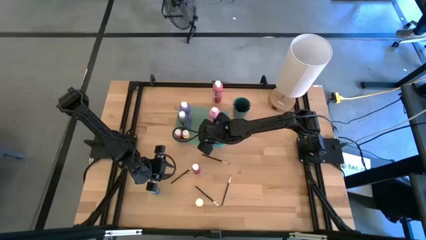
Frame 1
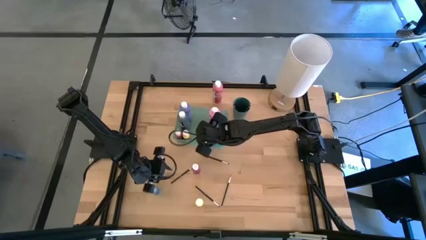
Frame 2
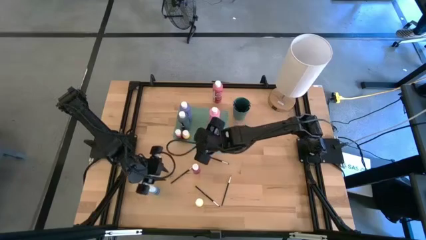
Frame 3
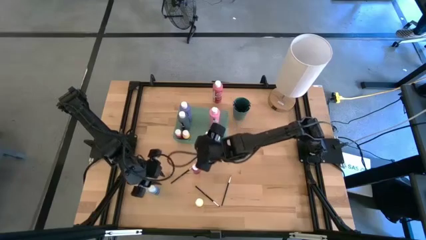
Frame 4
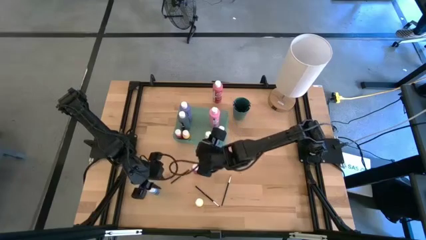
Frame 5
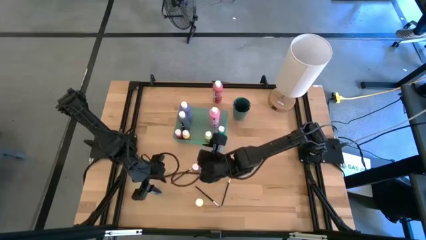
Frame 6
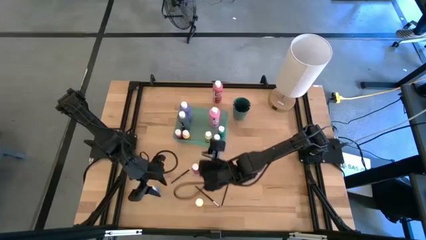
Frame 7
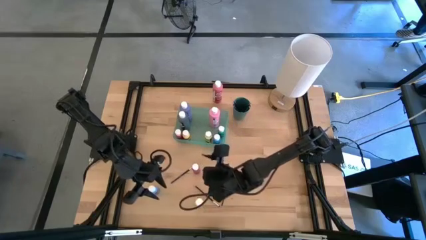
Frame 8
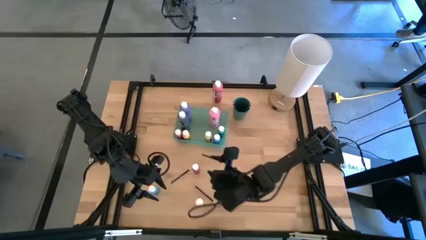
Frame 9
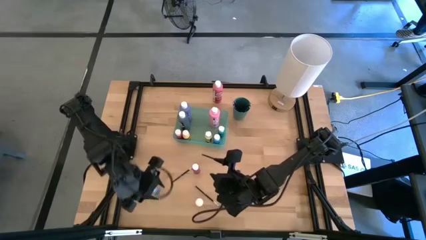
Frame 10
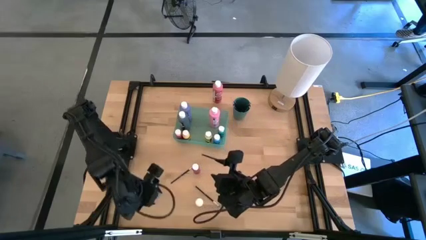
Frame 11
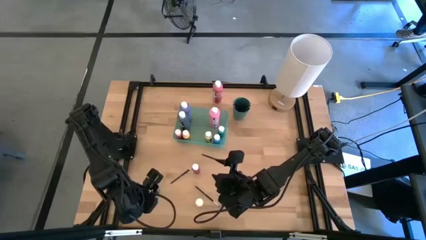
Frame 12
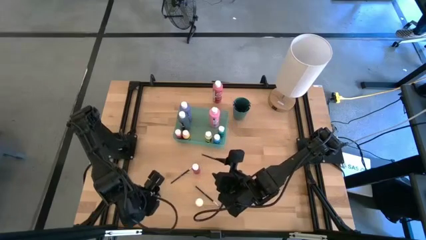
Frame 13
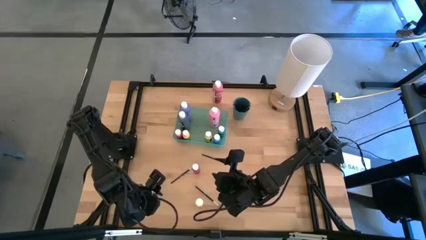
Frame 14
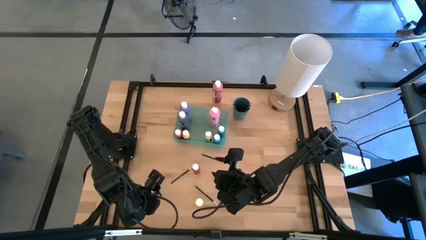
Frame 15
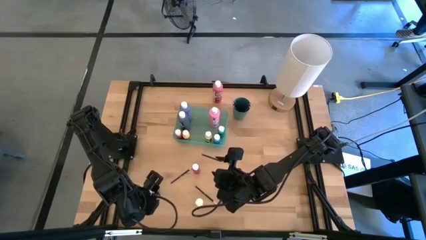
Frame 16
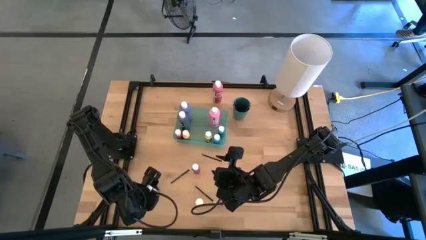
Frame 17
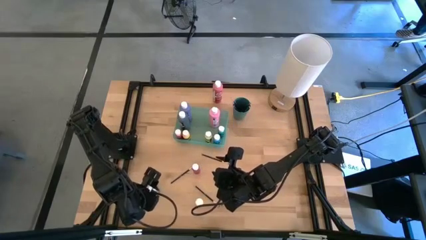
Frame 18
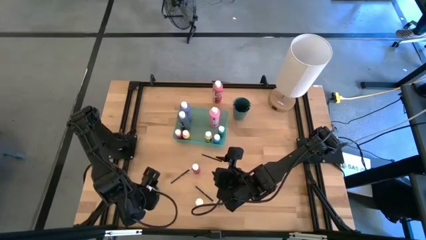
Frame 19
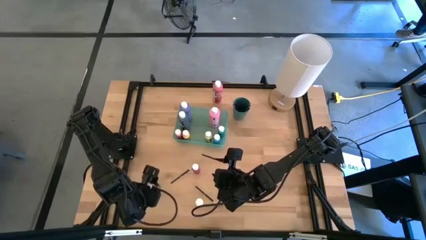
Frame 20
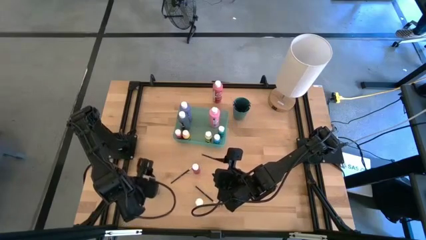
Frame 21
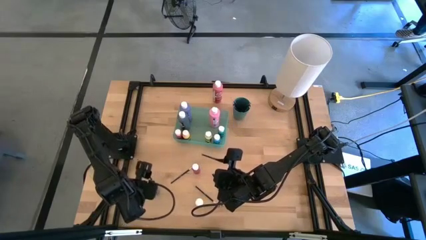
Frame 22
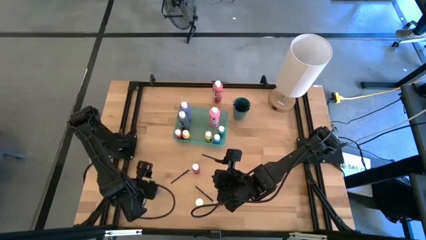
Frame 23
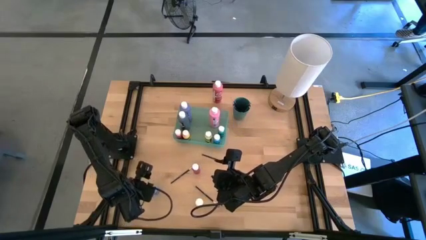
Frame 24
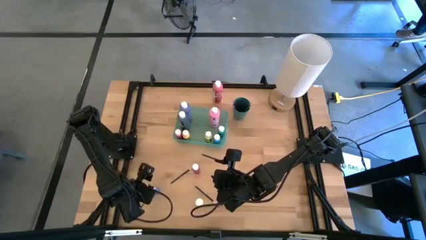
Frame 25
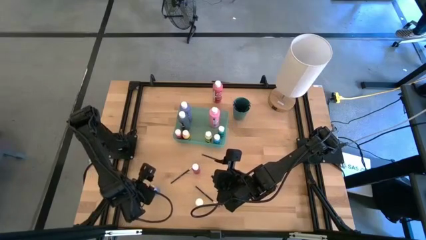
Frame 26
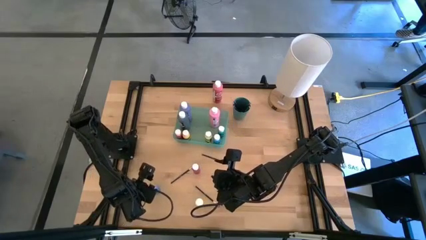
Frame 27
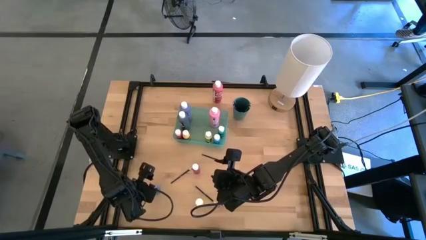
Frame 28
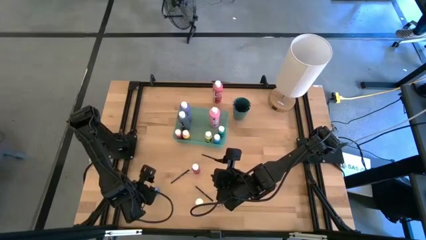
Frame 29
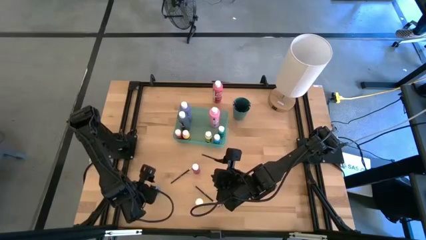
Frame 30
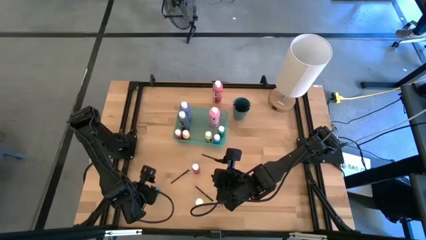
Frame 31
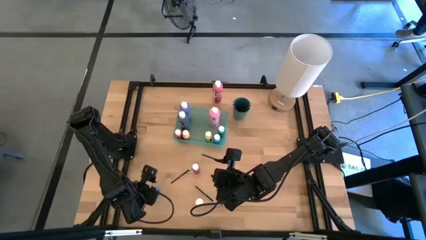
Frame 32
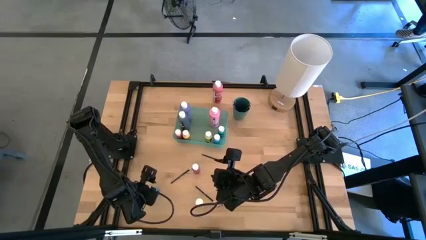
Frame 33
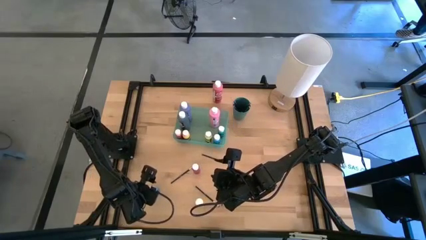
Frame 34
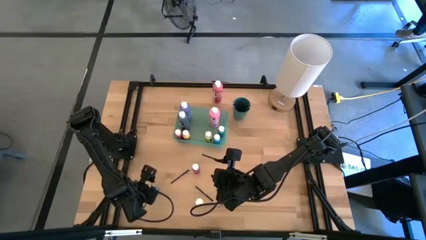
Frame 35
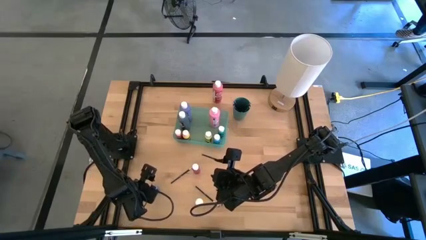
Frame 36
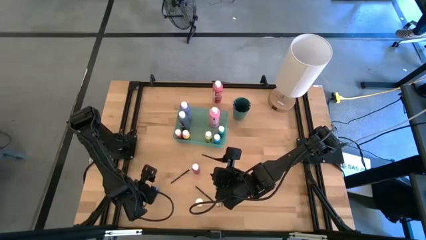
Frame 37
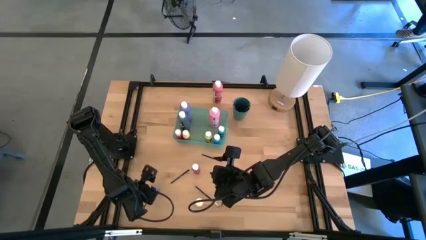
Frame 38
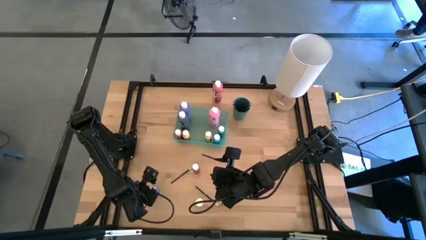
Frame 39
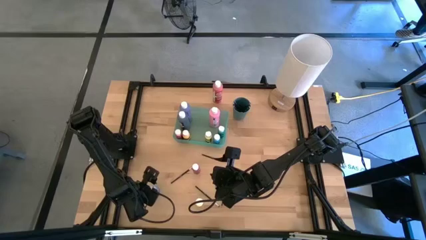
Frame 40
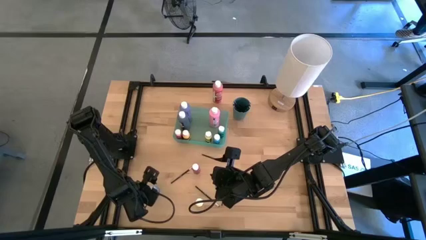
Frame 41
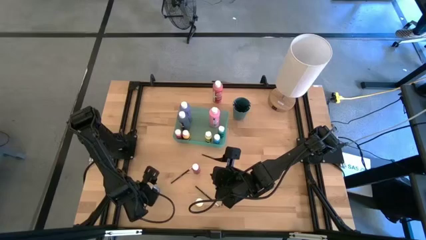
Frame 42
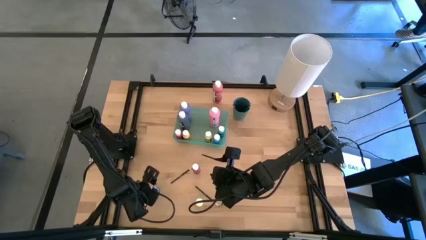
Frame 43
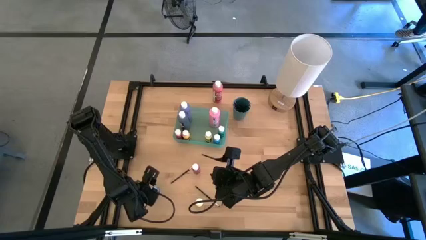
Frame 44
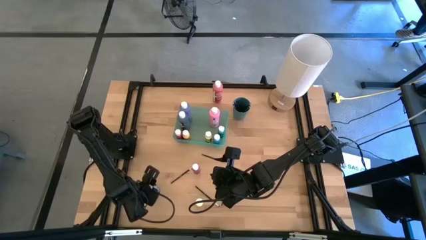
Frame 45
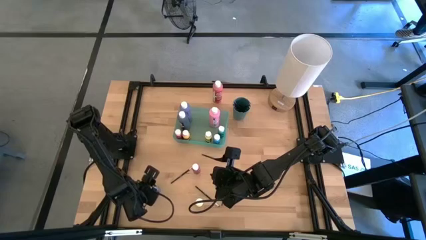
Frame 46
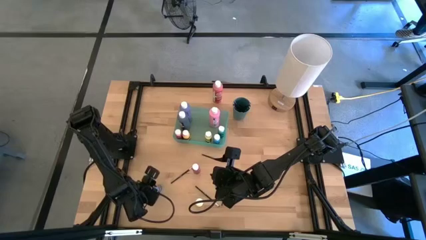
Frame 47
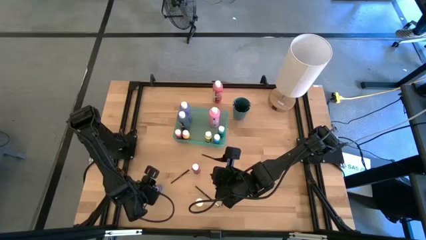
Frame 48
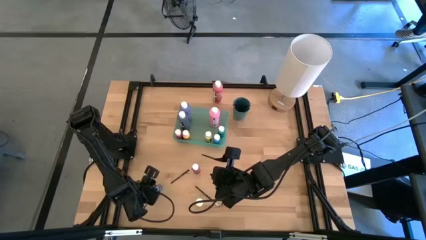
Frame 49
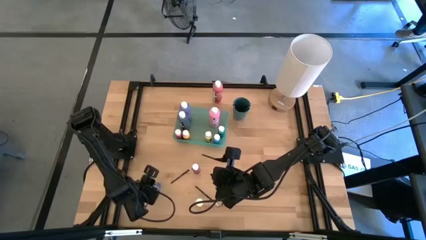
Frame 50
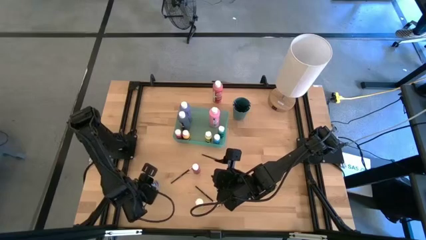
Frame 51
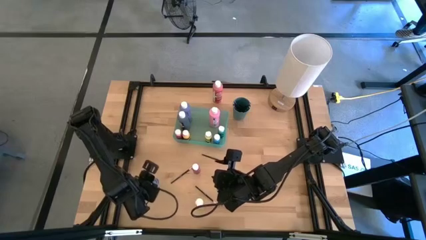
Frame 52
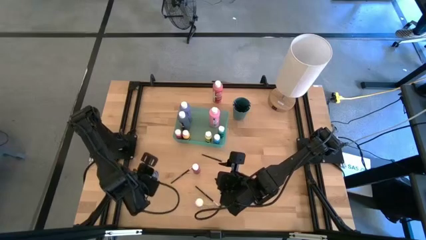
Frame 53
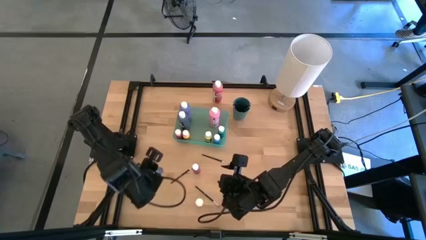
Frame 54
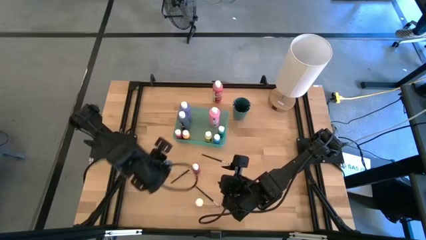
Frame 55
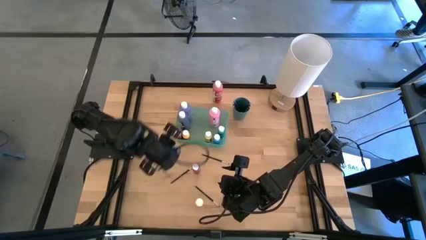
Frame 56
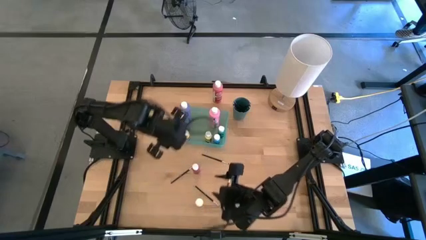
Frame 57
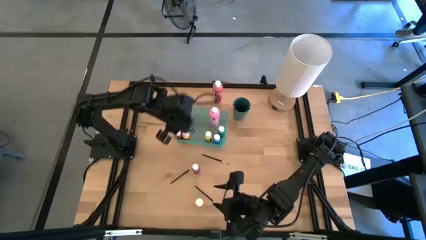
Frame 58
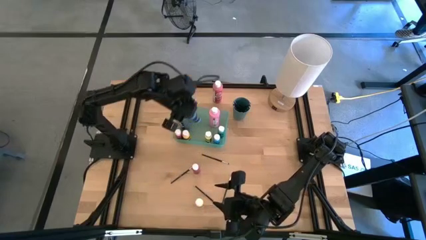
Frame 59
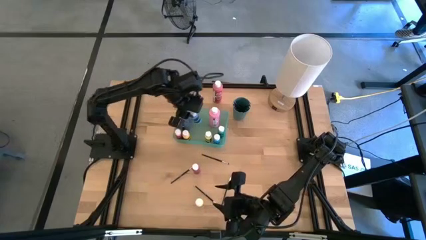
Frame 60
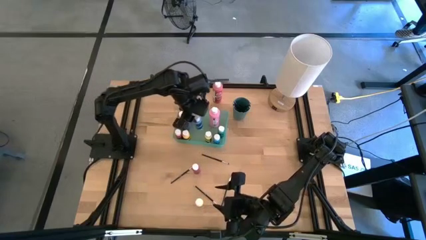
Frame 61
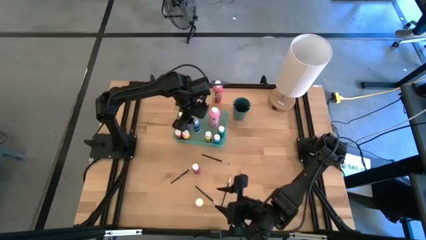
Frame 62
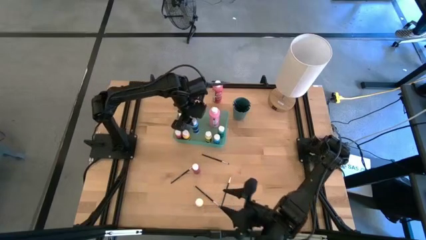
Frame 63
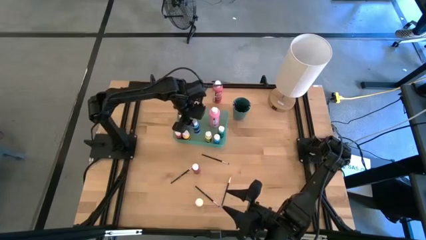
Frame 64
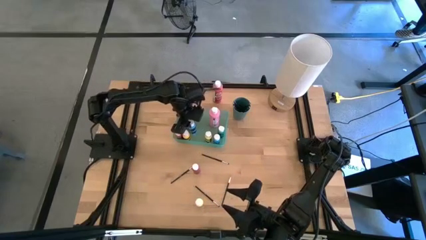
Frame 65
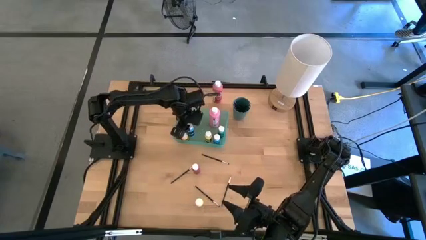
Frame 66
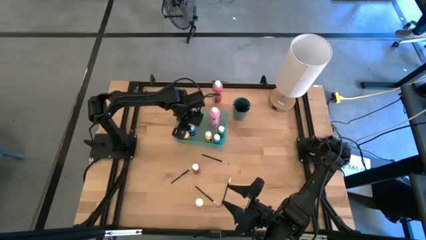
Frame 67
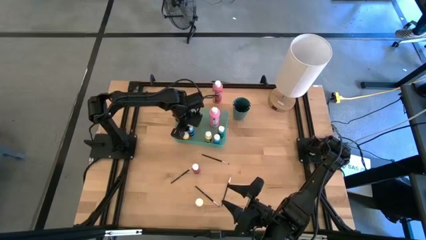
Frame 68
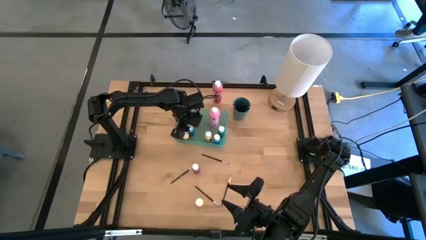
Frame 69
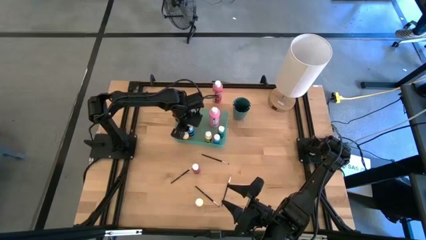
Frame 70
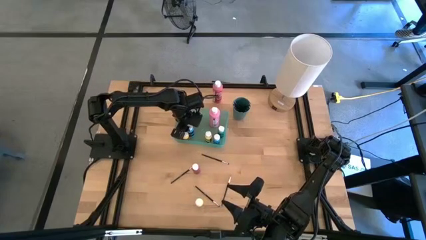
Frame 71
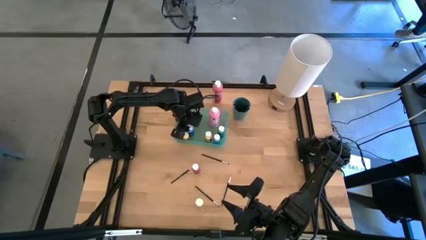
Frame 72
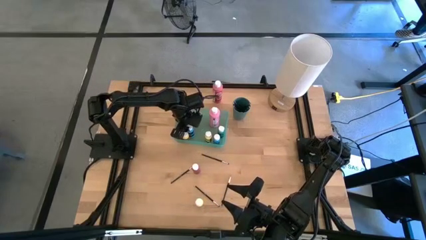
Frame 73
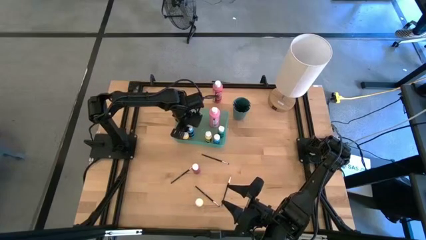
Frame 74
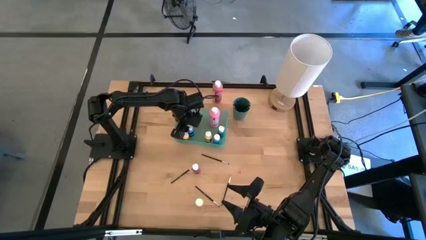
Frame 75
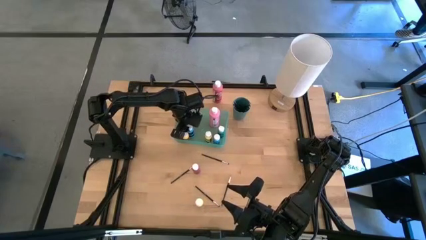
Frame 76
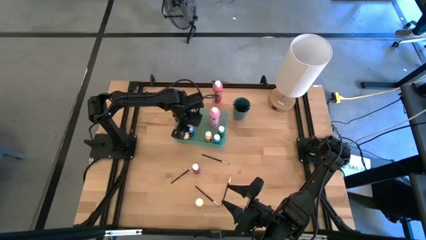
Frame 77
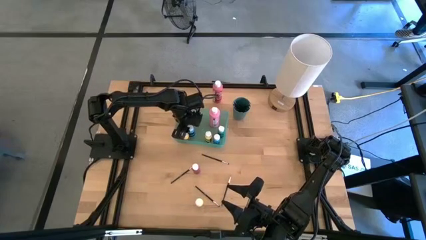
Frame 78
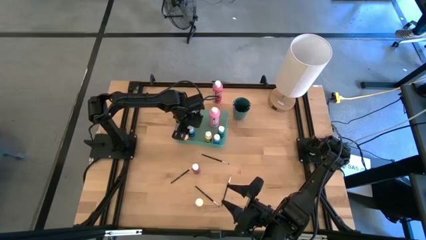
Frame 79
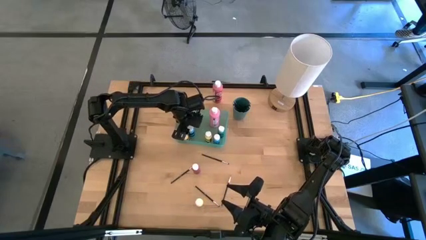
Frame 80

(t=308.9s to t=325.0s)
Task: Pick & Place Paint Supplies
Put the small blue paint bottle into the green bin
